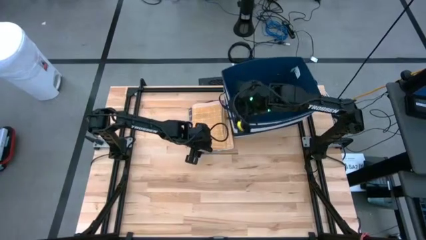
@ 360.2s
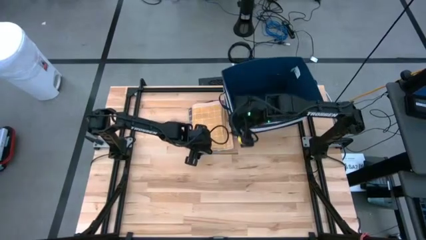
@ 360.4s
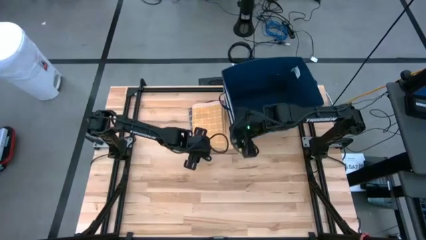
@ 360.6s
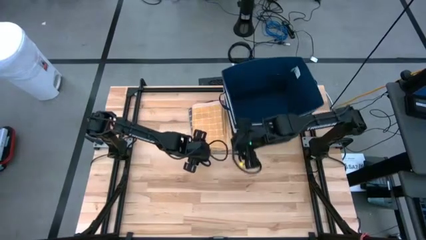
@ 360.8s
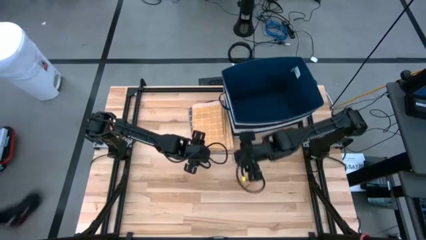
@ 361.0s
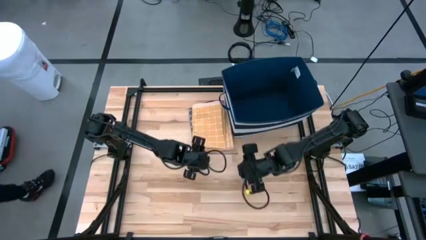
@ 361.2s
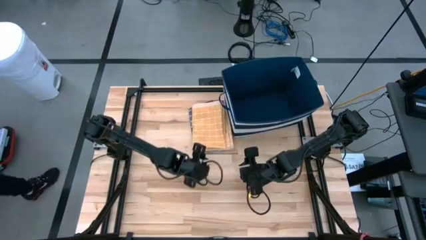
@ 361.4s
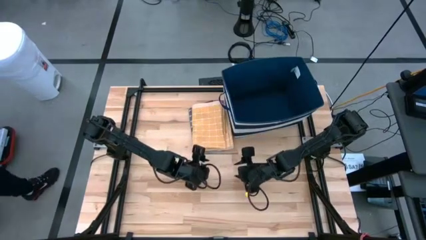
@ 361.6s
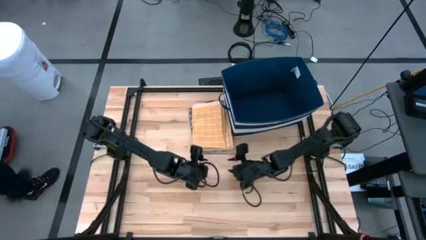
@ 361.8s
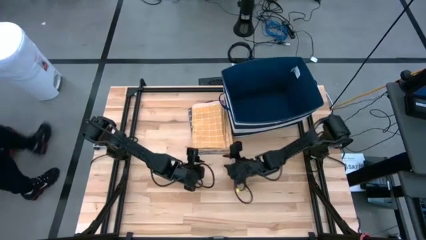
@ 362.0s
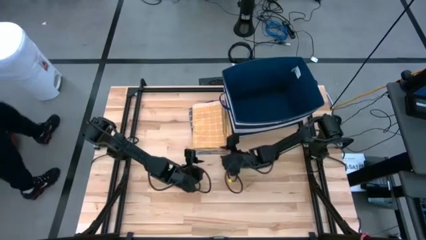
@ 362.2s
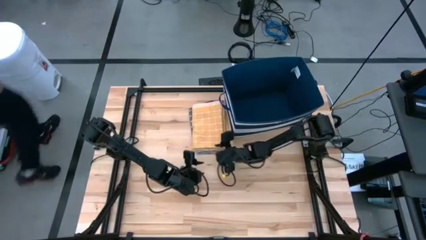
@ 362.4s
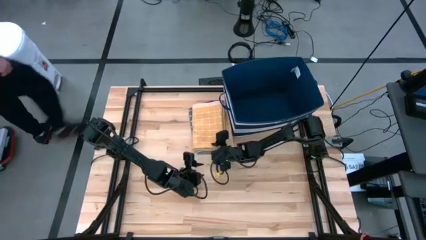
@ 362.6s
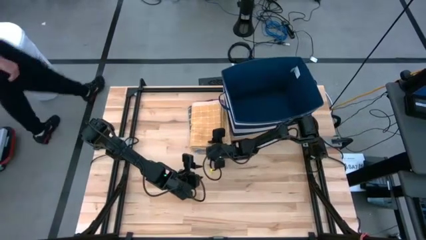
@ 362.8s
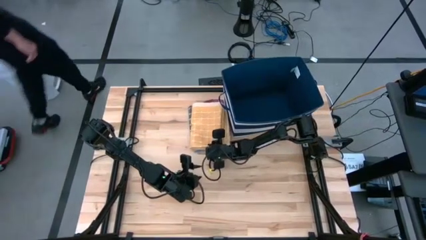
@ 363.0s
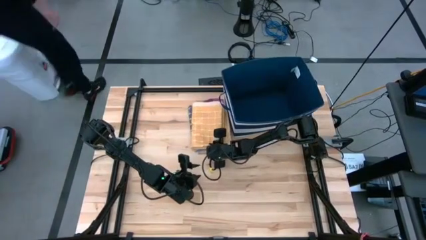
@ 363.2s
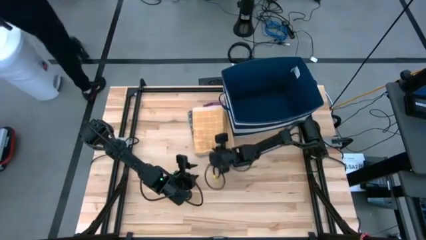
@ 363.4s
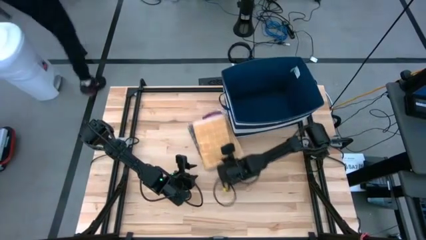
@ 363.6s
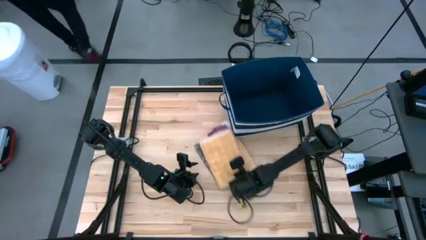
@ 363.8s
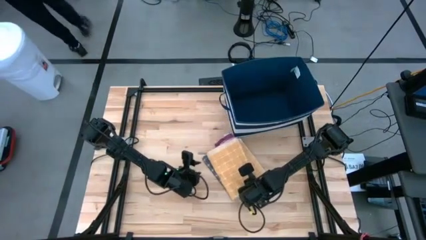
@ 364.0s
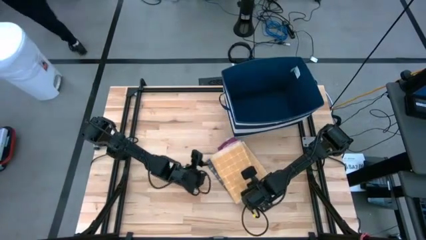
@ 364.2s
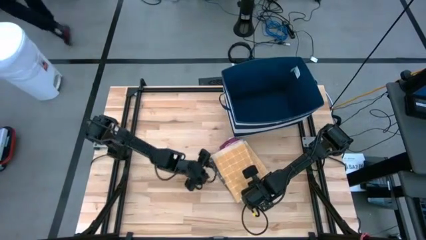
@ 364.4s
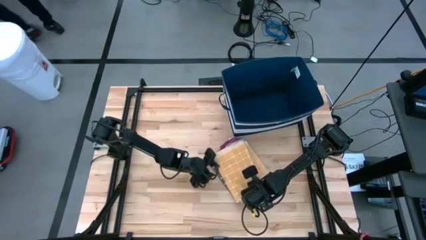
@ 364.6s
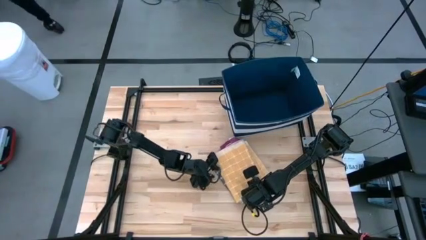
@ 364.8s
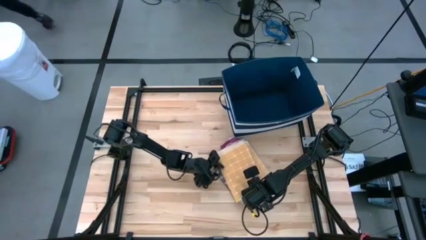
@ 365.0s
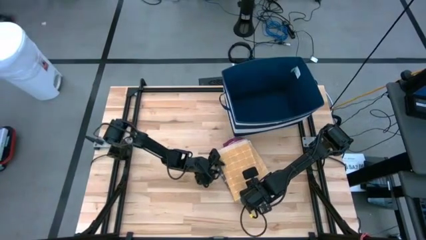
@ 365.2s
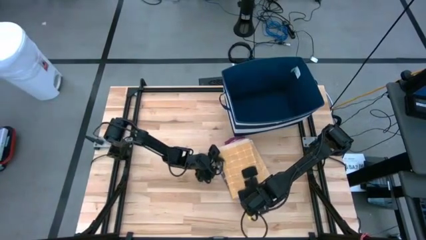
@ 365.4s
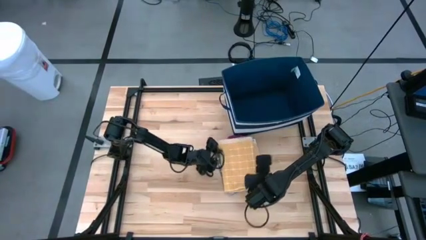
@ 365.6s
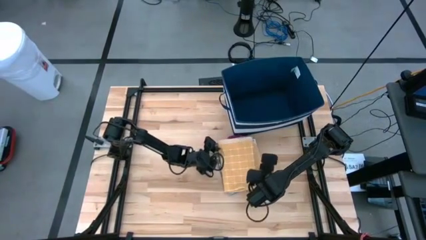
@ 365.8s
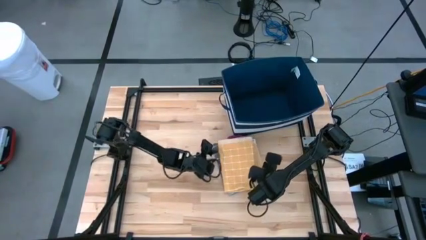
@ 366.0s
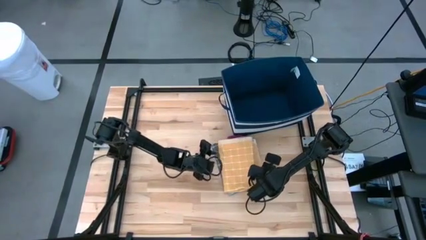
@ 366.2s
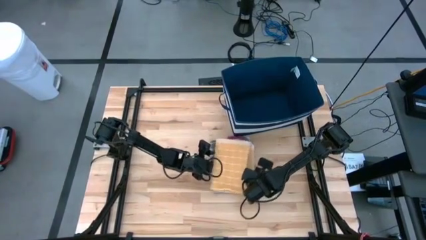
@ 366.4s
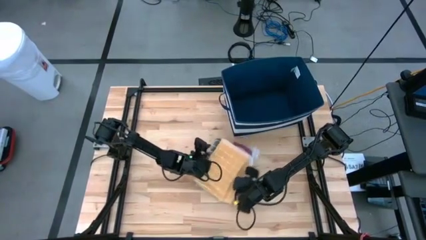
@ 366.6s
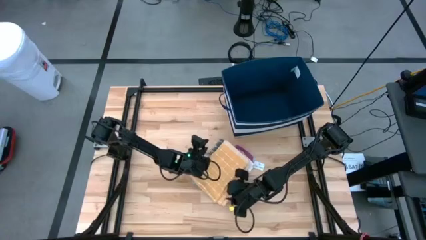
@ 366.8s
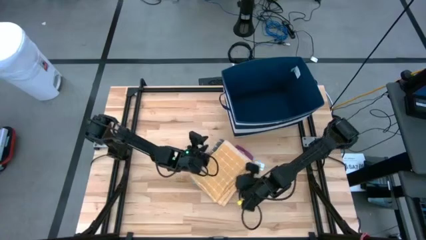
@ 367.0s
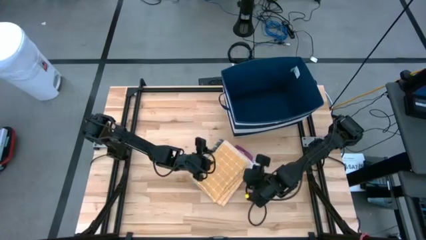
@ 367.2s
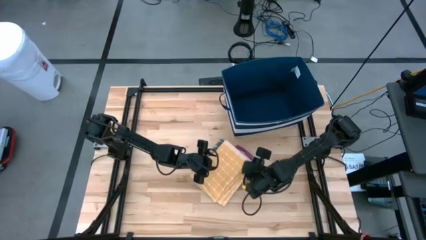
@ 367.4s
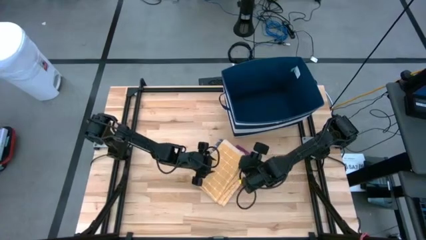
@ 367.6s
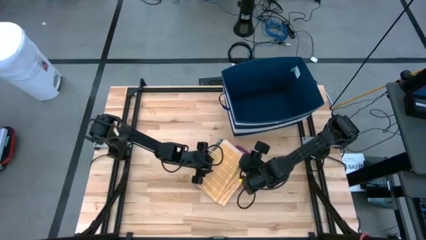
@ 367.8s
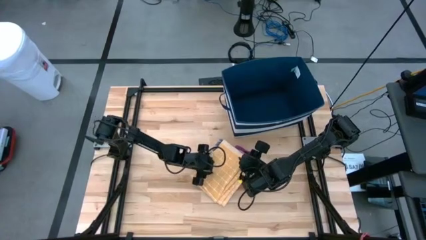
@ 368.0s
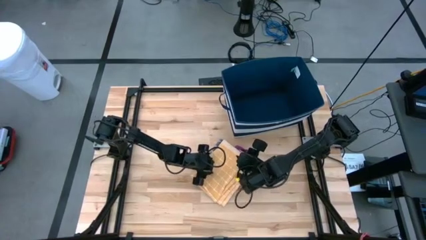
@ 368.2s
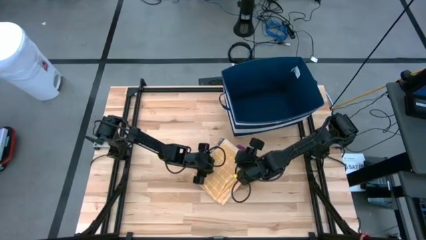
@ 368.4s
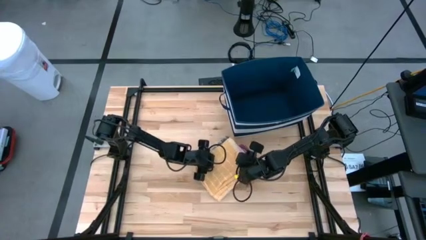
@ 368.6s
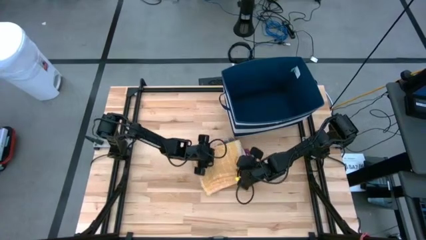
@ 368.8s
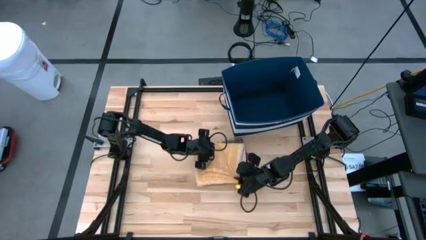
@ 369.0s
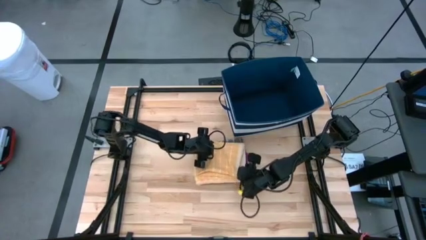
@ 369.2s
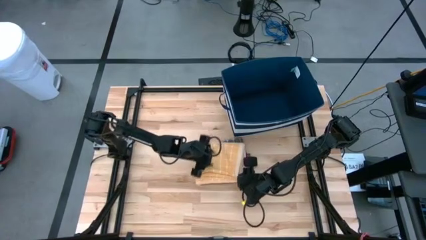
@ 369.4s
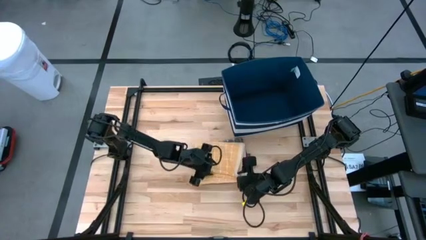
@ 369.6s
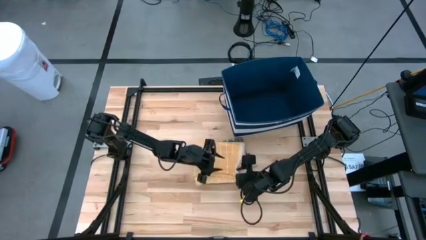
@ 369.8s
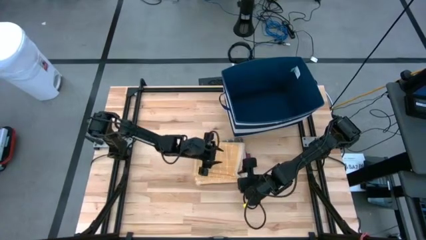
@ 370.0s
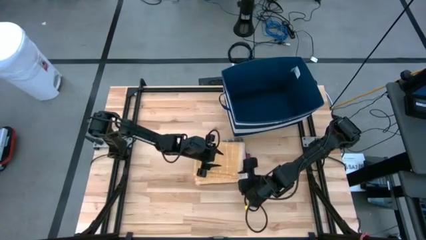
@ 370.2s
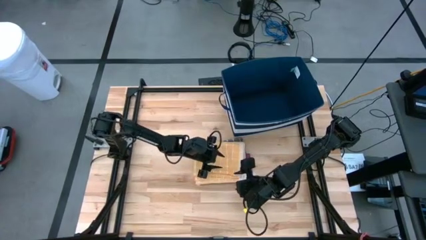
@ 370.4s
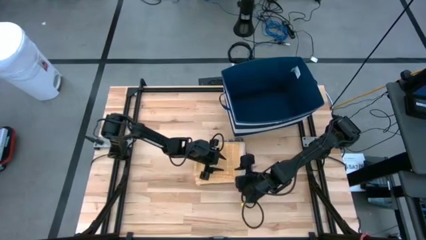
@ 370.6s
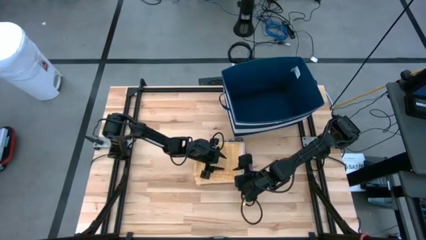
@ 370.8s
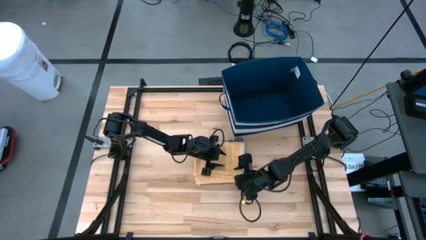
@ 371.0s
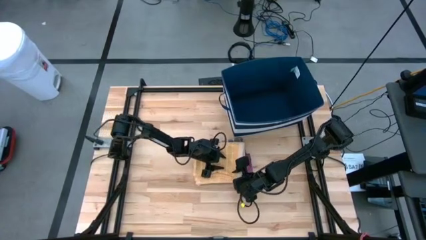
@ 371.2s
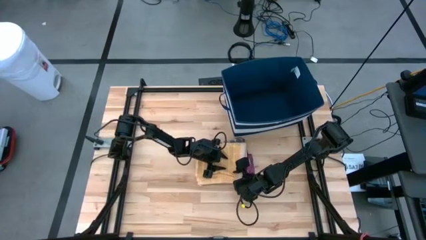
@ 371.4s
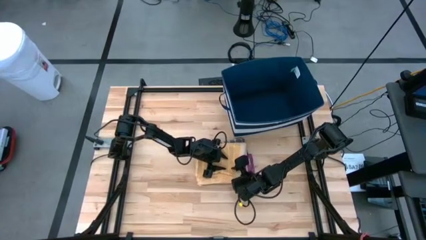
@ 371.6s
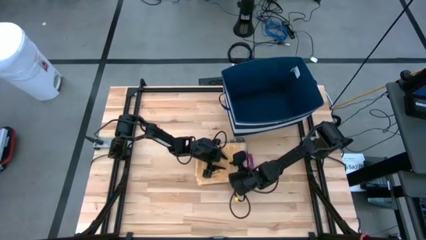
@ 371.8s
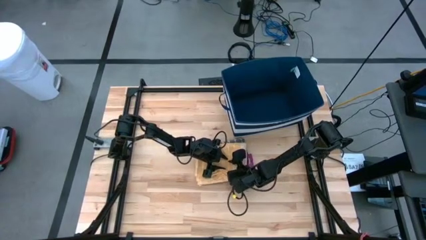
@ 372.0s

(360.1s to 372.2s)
Task: Fold towel
Put the folded stacked towels into the blue laundry bin

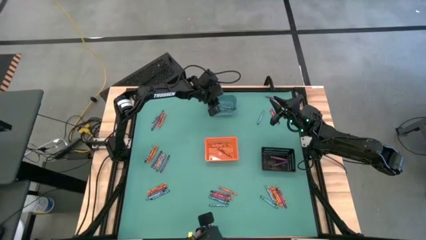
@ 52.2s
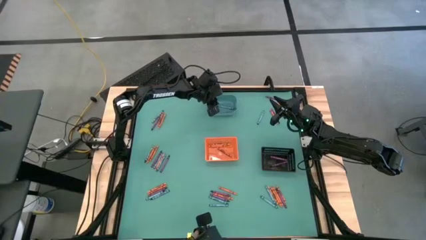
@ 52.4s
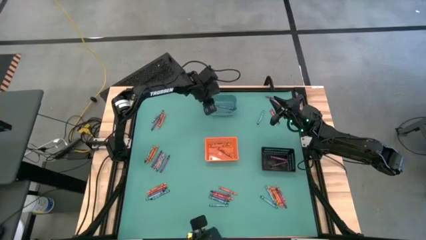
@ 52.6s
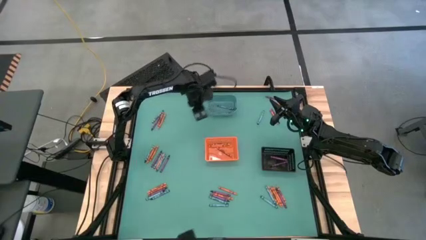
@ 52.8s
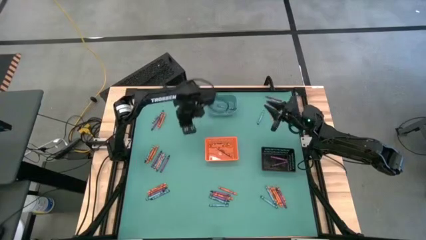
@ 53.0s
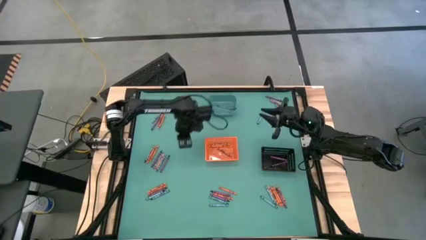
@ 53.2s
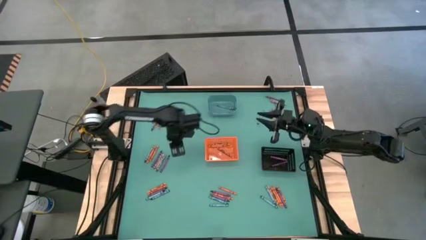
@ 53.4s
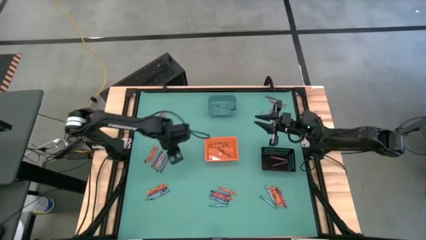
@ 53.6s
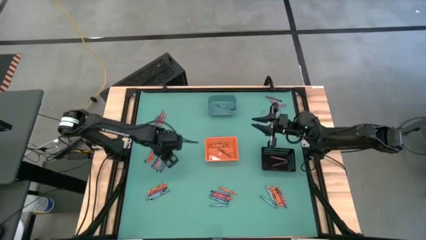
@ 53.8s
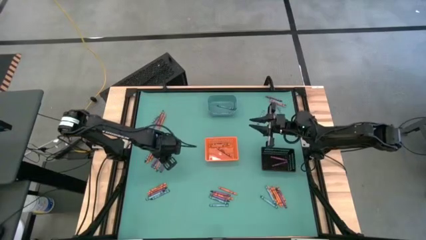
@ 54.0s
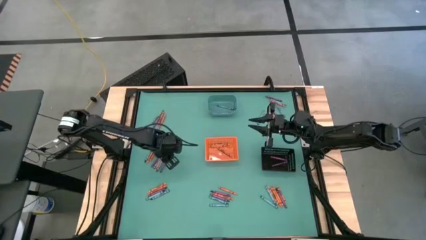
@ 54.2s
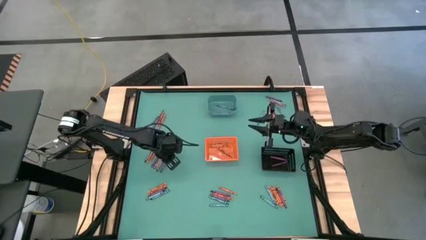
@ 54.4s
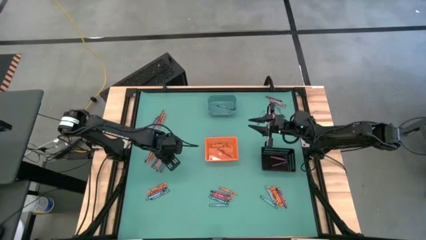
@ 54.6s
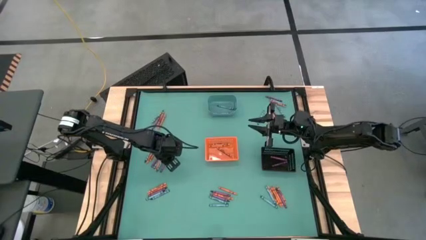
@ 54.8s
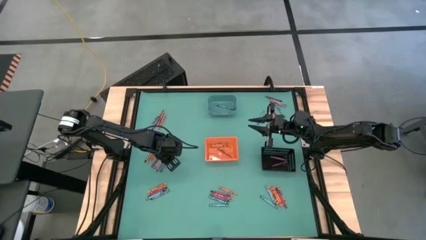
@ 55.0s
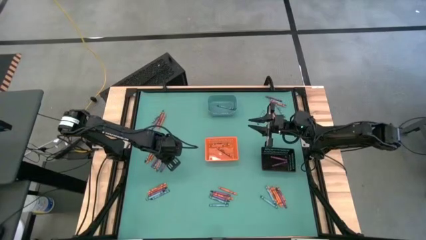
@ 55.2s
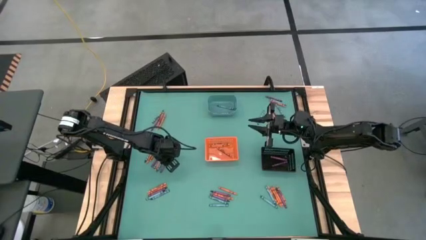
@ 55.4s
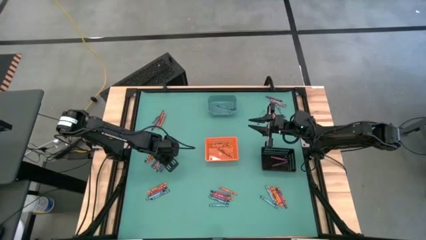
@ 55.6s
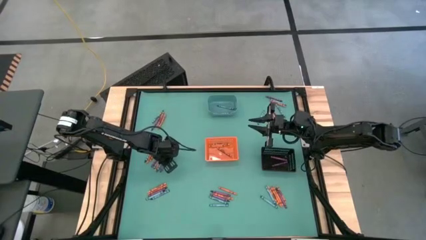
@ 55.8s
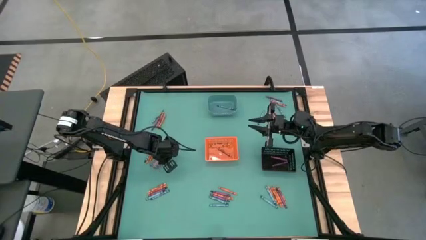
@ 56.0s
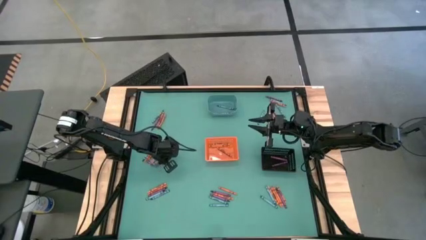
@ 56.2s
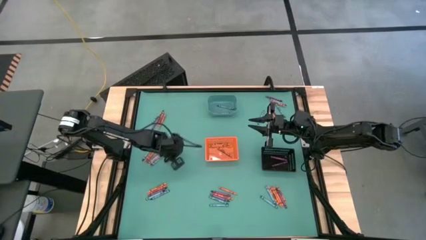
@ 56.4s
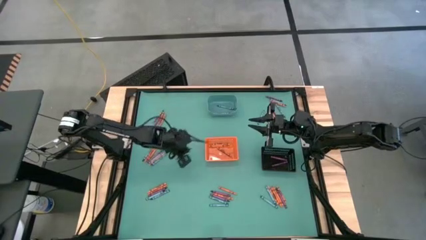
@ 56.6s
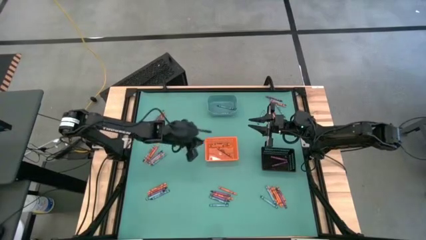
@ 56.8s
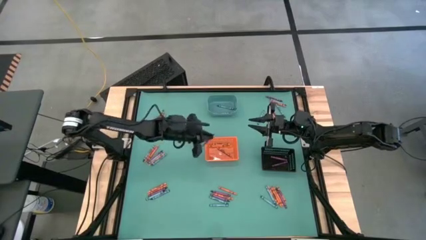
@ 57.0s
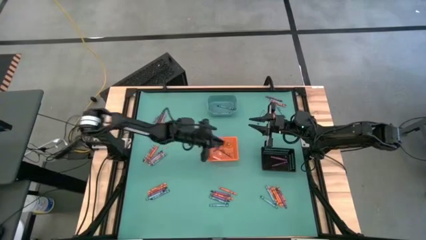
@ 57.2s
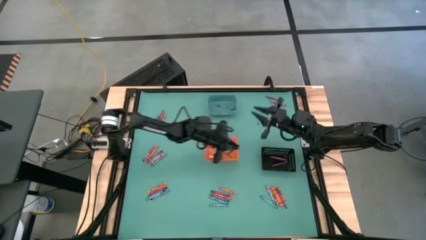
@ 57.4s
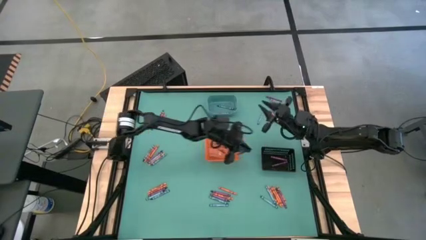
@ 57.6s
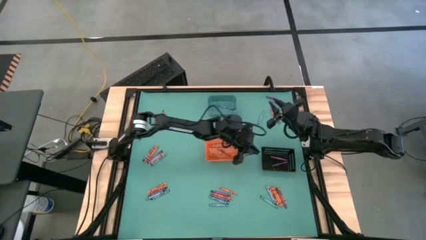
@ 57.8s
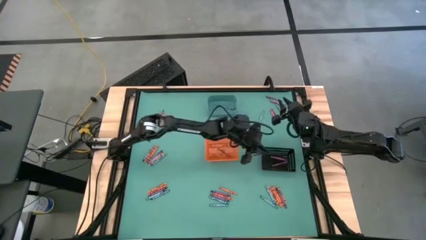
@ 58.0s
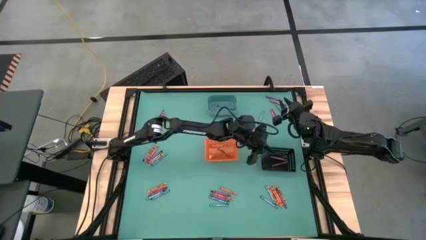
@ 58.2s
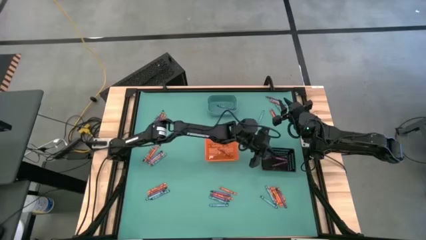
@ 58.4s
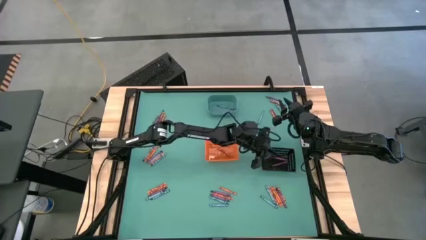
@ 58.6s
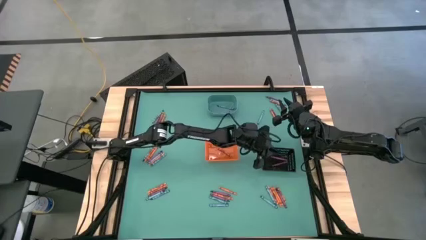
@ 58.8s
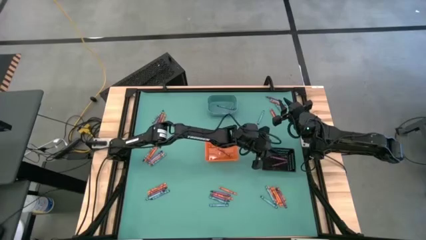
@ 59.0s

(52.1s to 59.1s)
Task: Sort crayons
Put the violet crayon into the black bin
